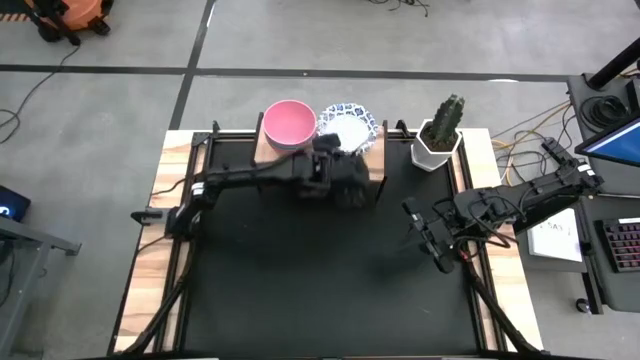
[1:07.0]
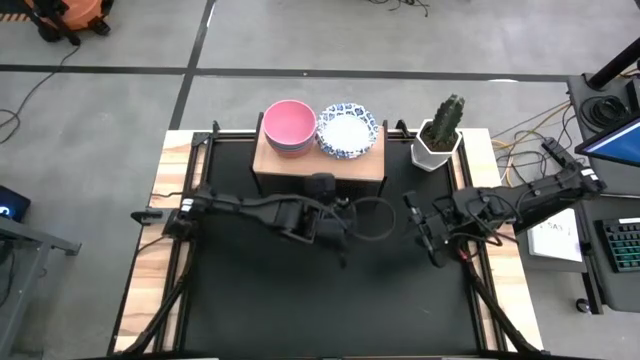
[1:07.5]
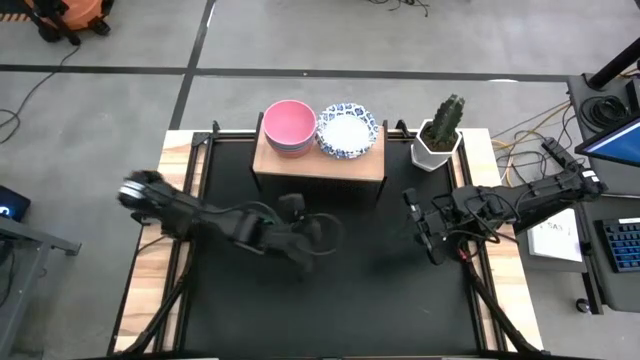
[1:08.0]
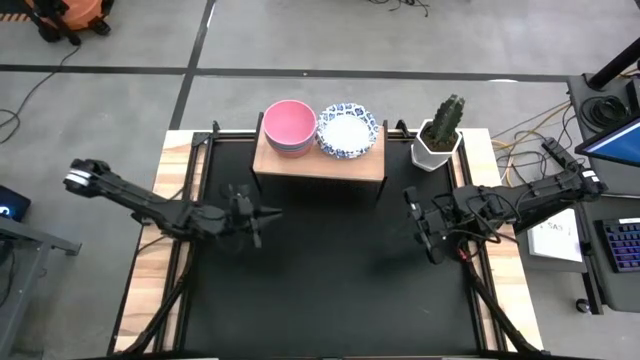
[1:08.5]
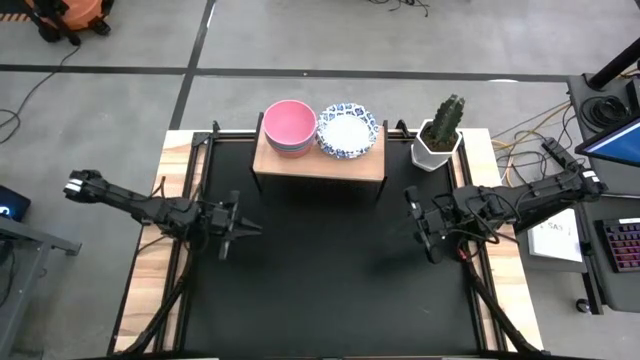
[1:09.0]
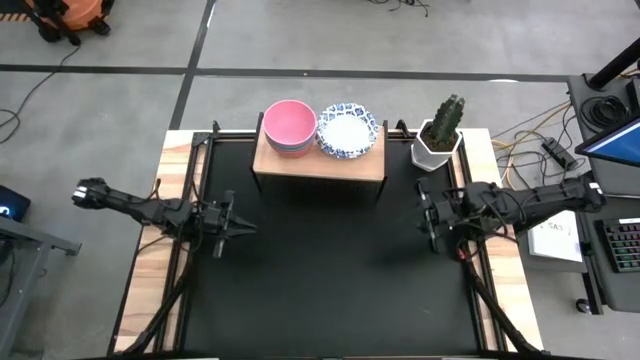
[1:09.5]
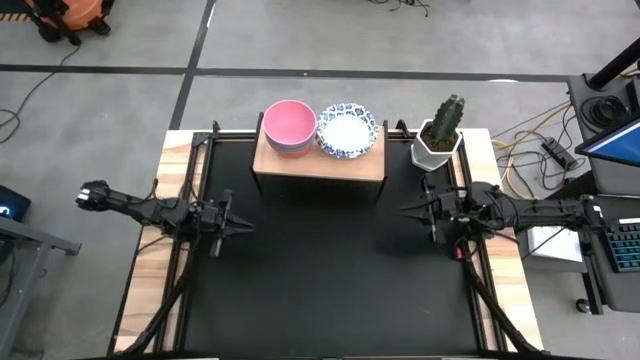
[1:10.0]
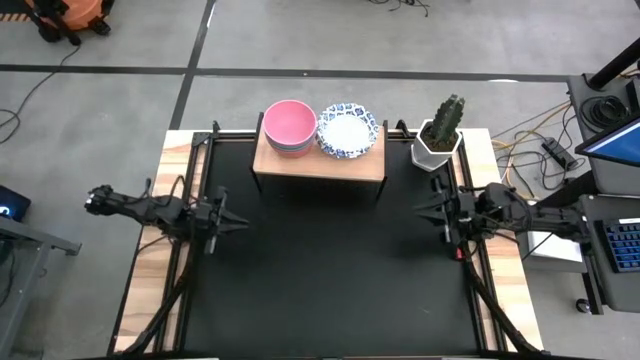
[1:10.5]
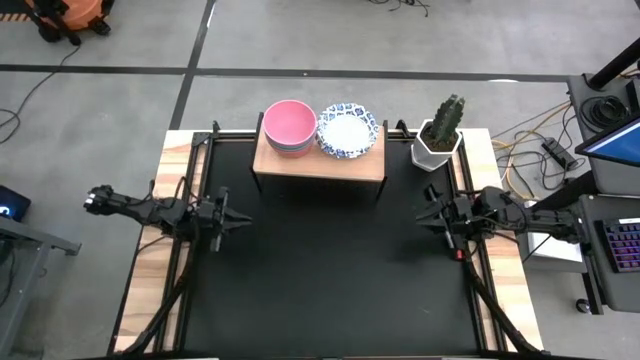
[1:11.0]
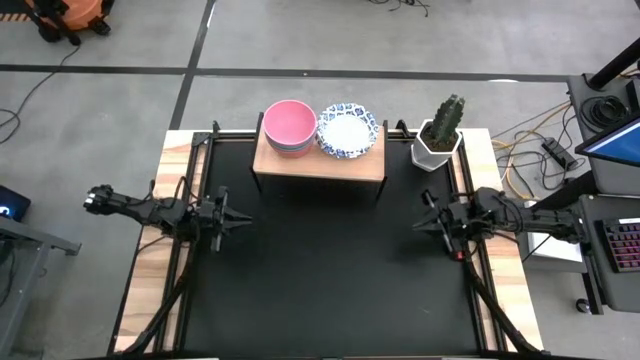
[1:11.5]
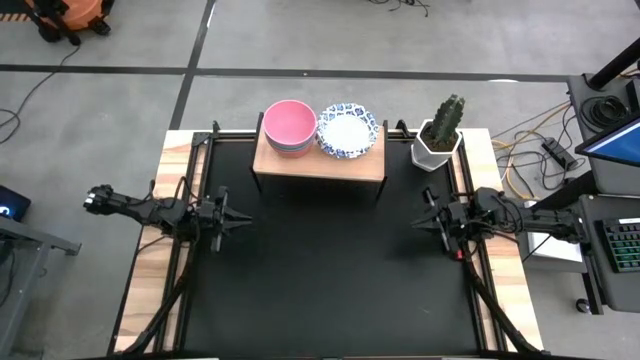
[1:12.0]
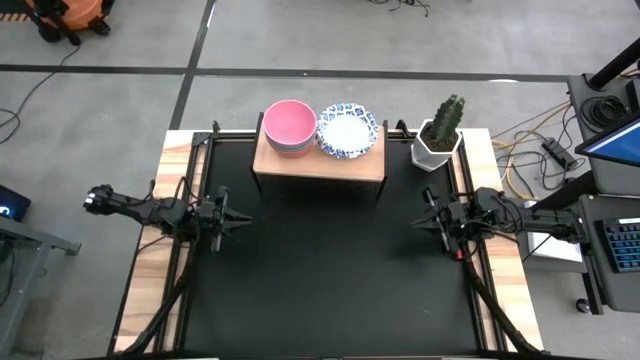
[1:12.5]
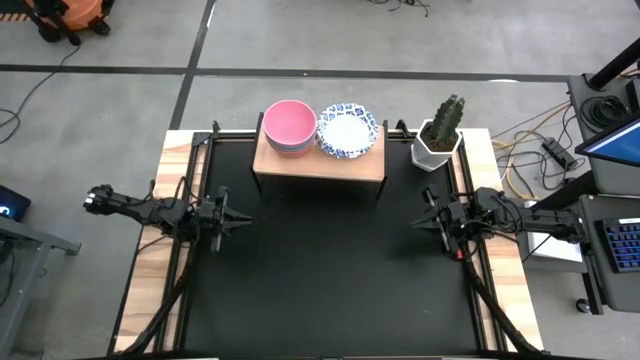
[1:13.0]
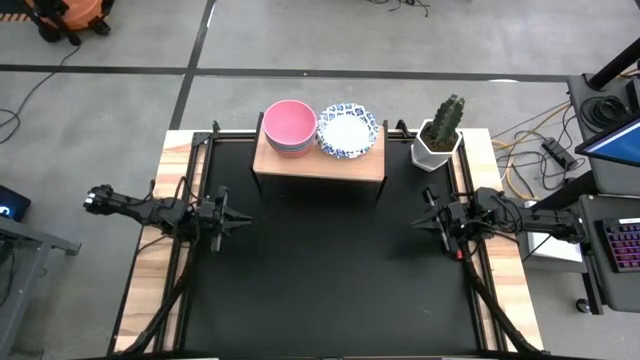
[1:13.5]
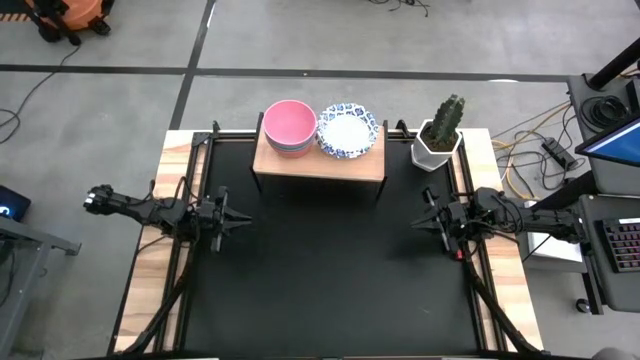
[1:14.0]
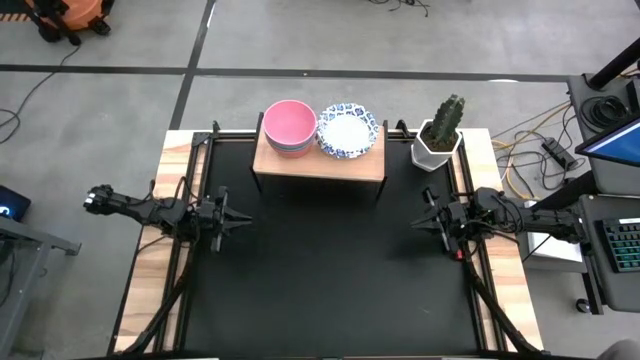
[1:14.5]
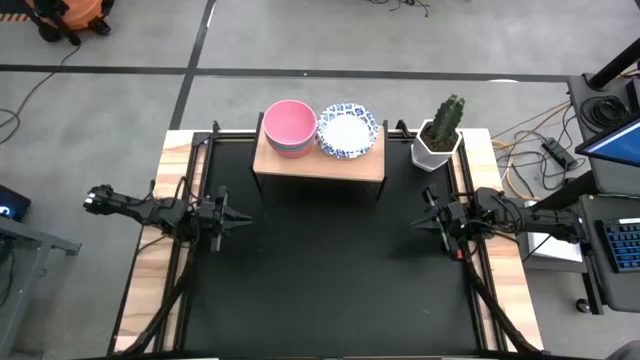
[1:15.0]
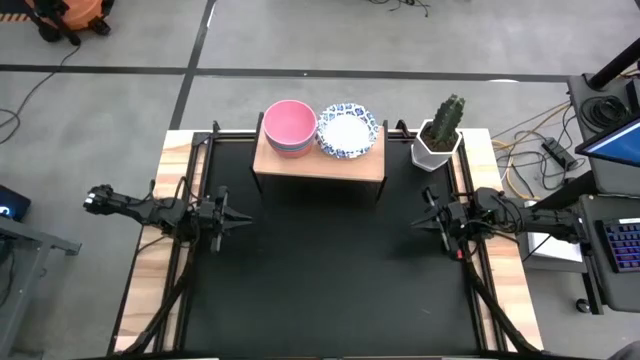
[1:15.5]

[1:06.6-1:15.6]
Task: Place and stack bowls onto a shelf
Return to Home Position

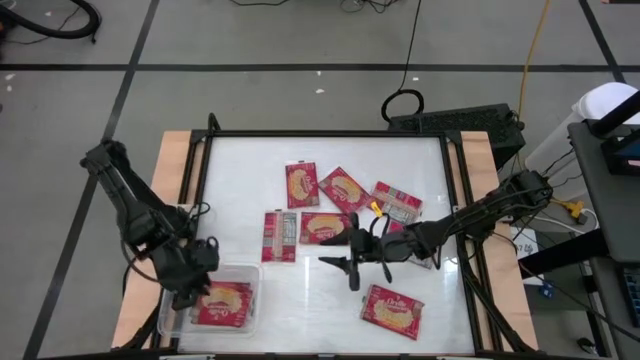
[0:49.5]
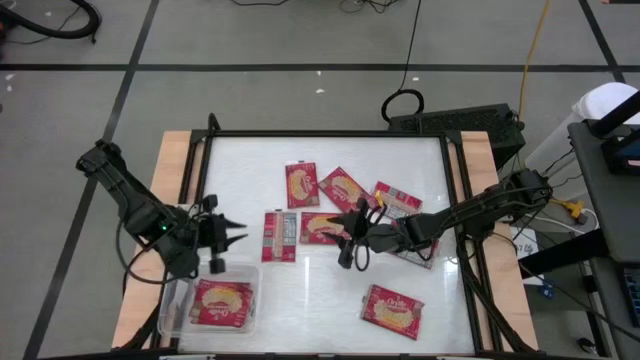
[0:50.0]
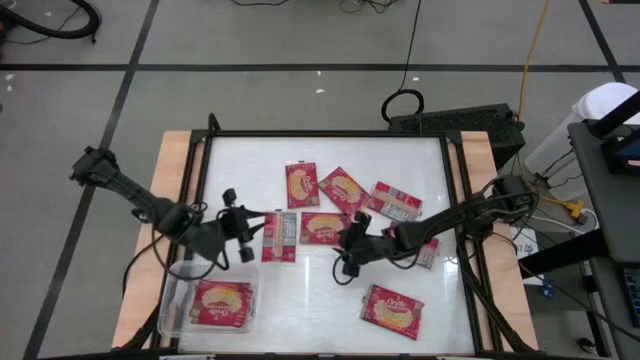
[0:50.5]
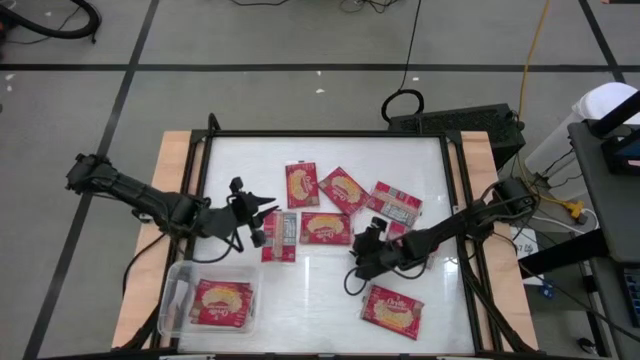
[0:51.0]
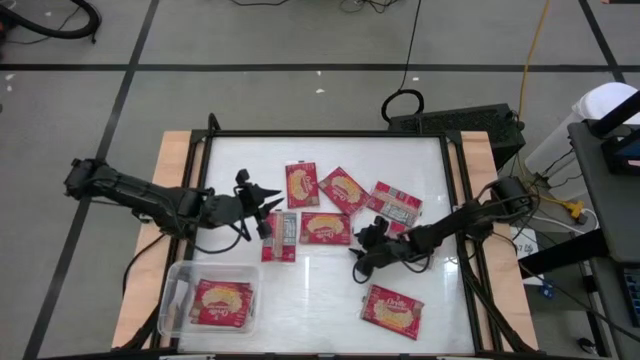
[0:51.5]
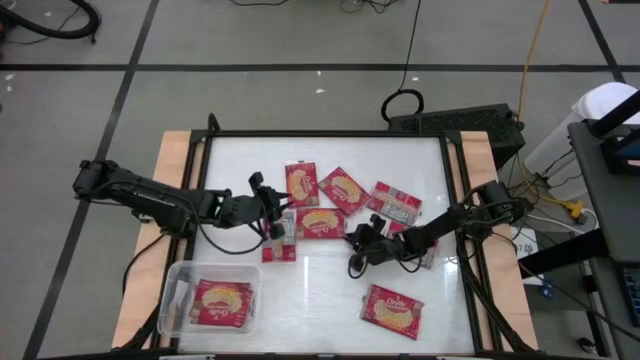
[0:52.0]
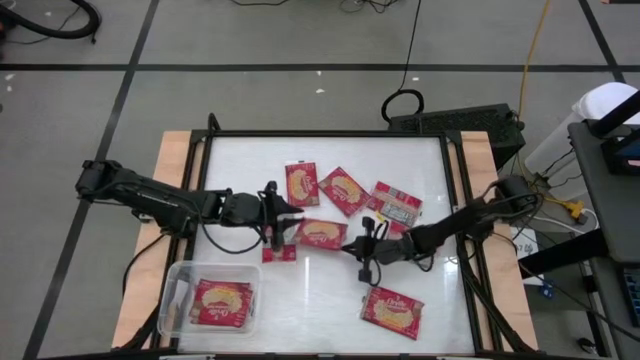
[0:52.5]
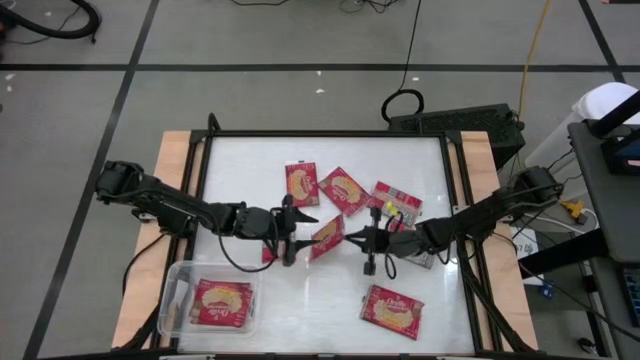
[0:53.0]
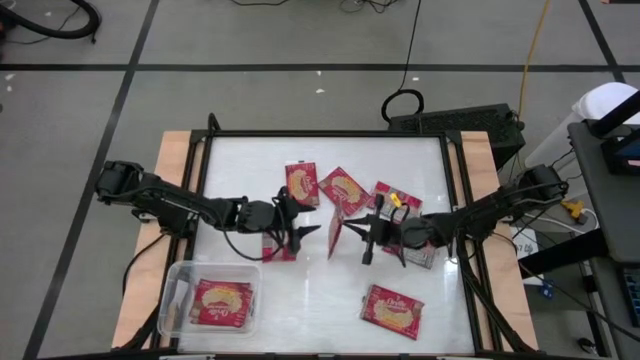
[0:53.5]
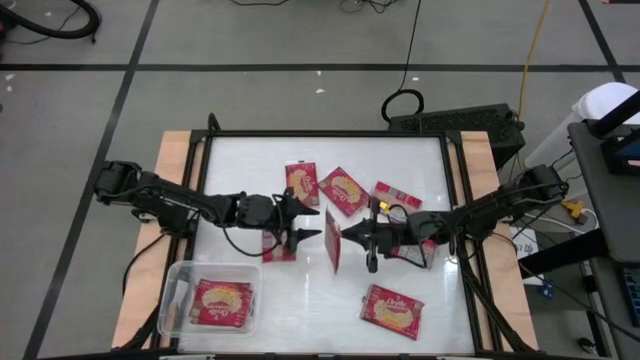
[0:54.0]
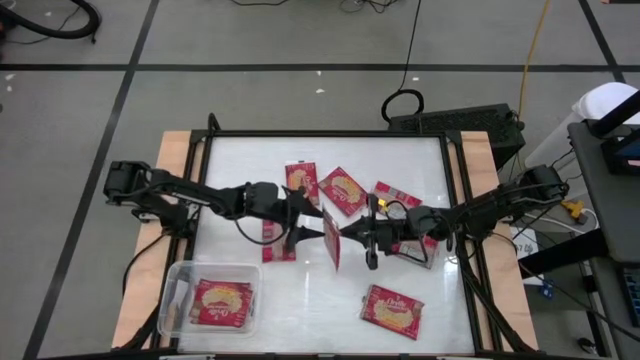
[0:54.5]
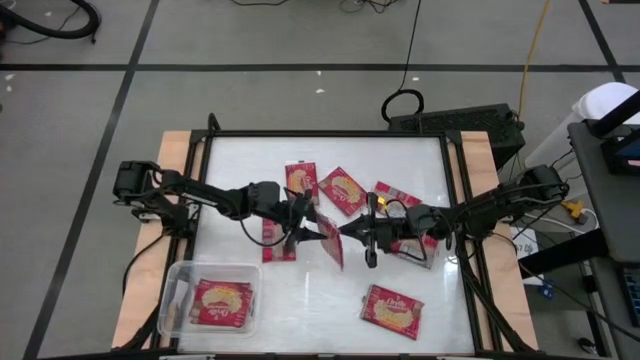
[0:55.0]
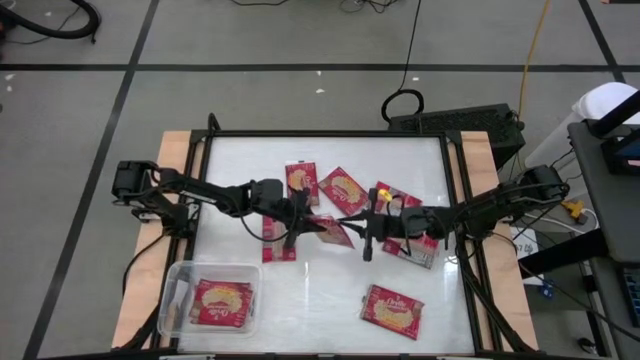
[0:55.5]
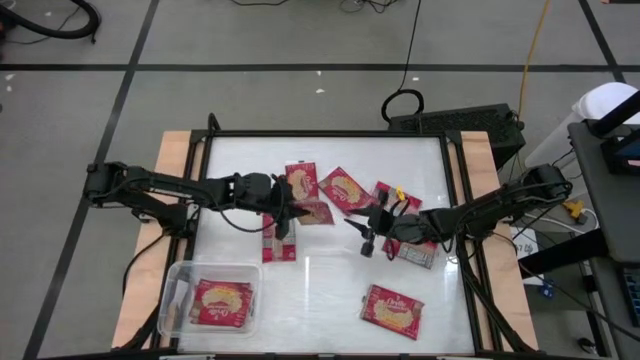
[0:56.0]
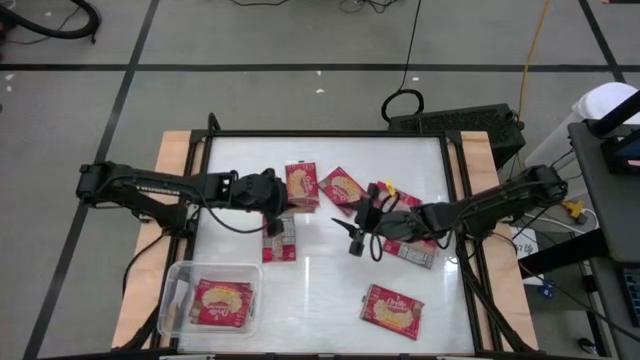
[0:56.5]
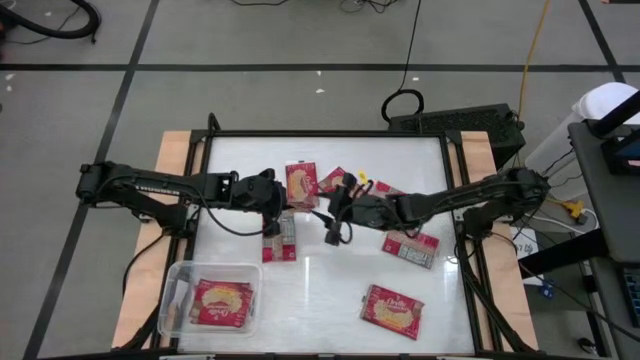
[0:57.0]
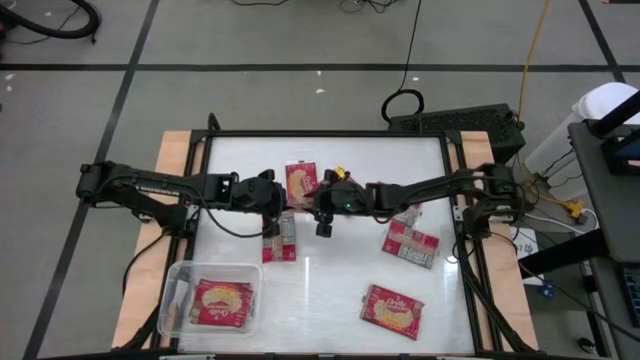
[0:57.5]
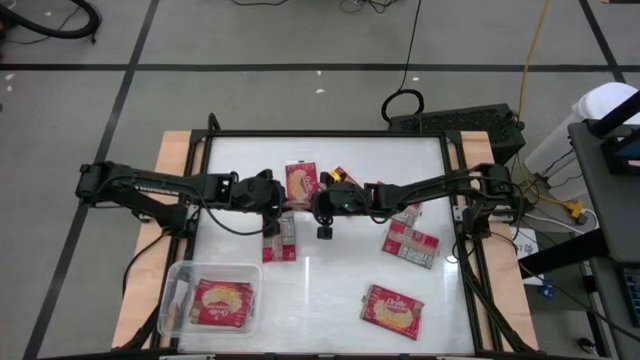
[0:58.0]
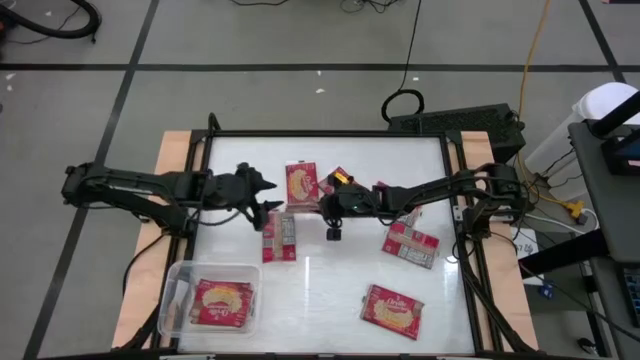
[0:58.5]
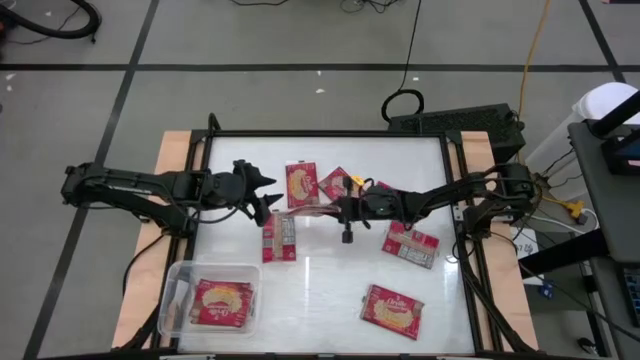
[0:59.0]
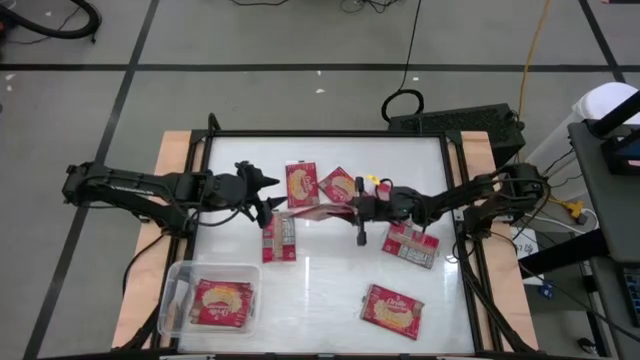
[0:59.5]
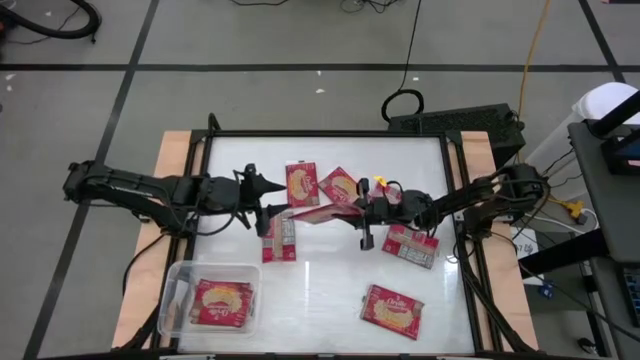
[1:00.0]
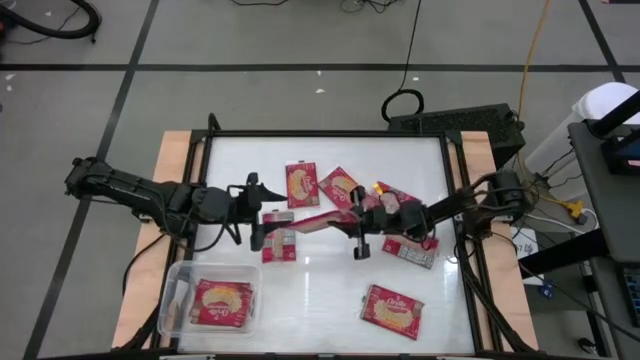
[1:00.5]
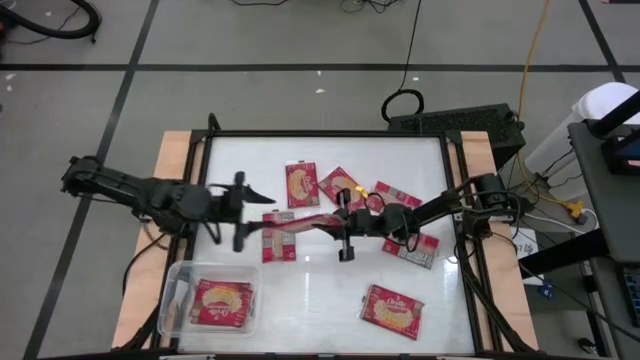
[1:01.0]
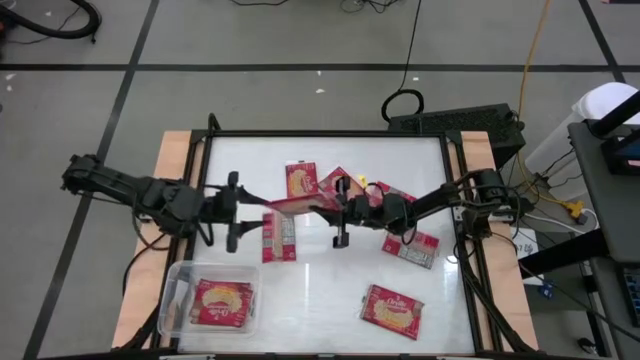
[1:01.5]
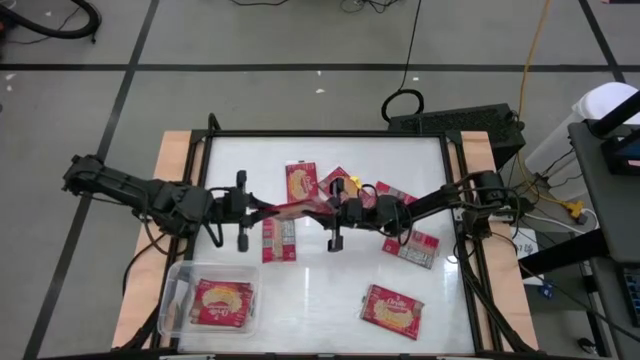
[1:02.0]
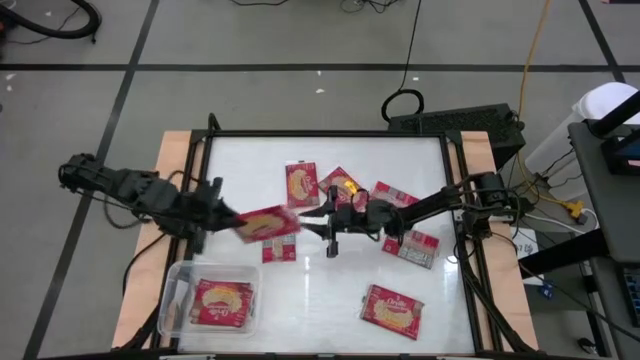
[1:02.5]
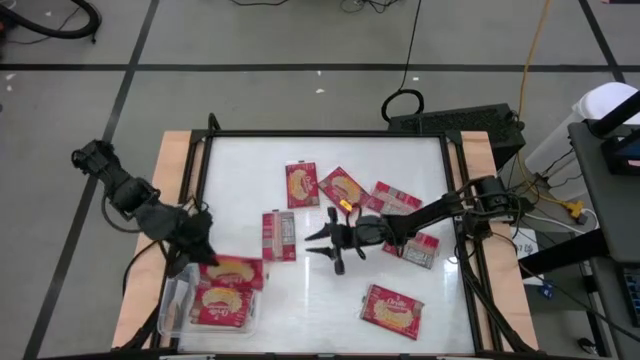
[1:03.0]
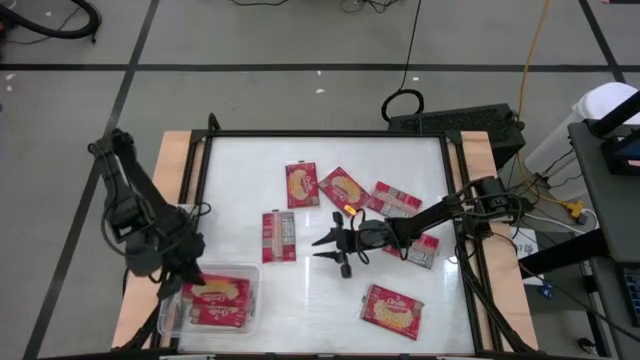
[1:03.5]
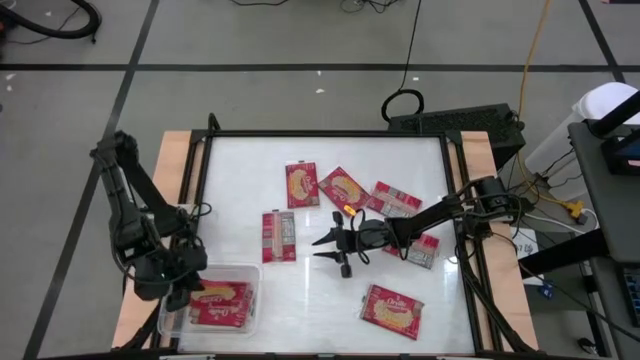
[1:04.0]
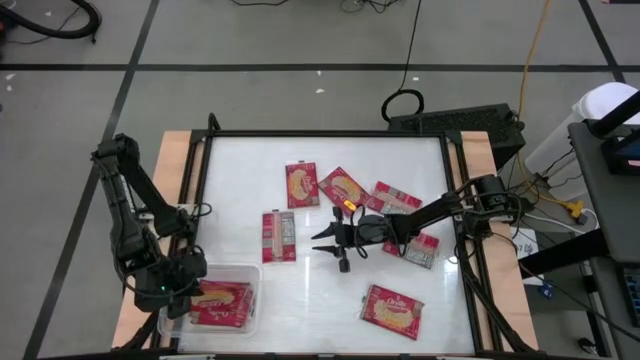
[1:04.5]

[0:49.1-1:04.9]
Task: Sort popcorn bags into baskets
Put the popcorn bag into the transparent bin
